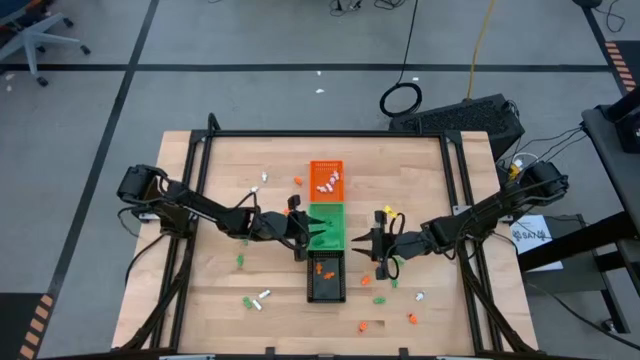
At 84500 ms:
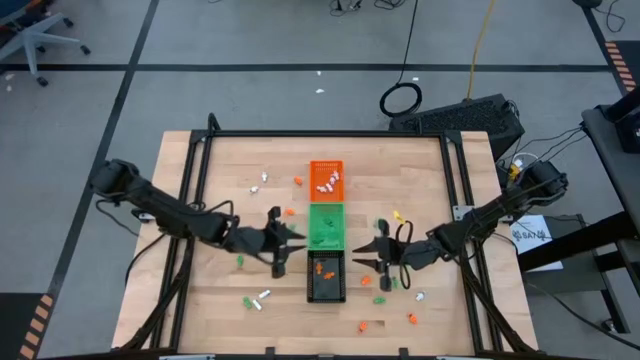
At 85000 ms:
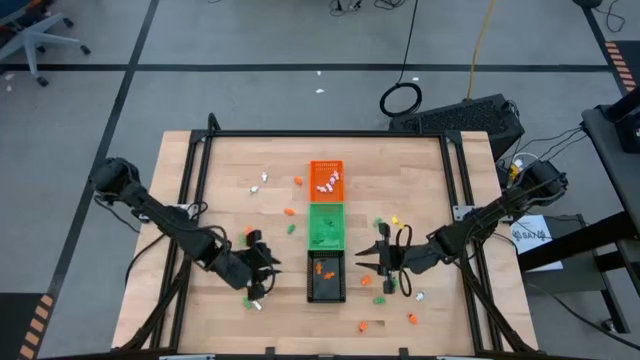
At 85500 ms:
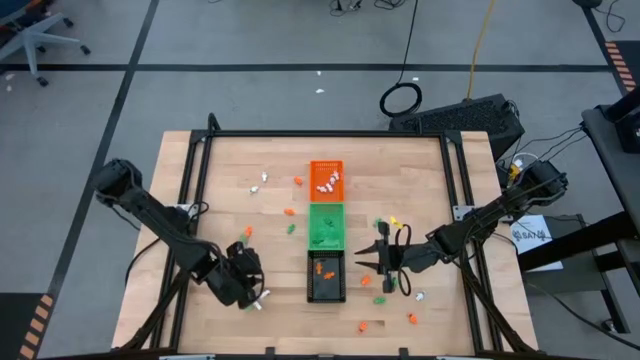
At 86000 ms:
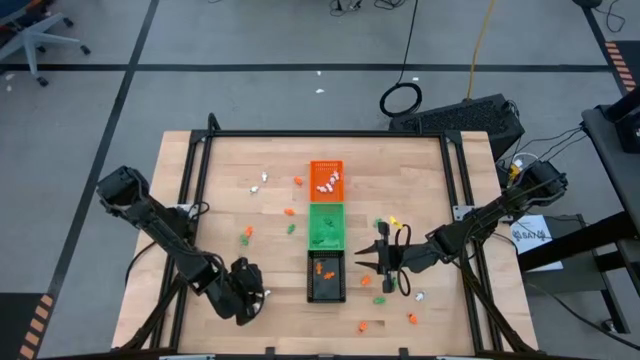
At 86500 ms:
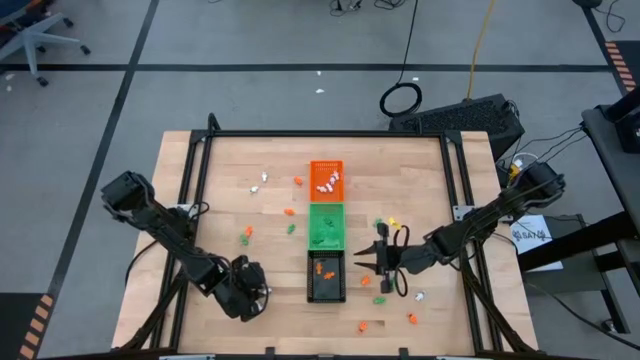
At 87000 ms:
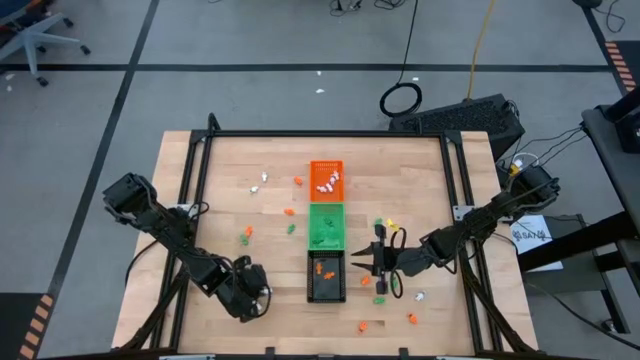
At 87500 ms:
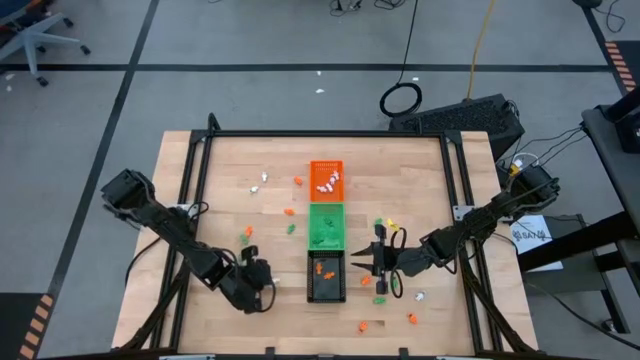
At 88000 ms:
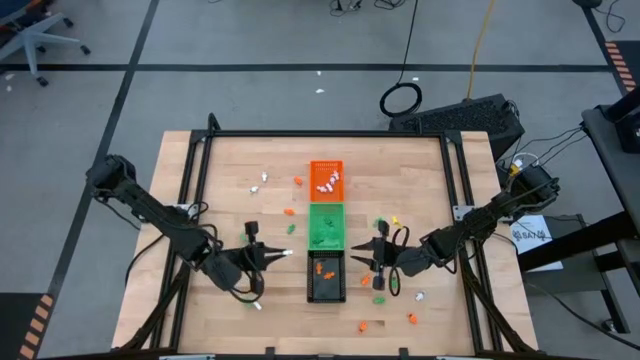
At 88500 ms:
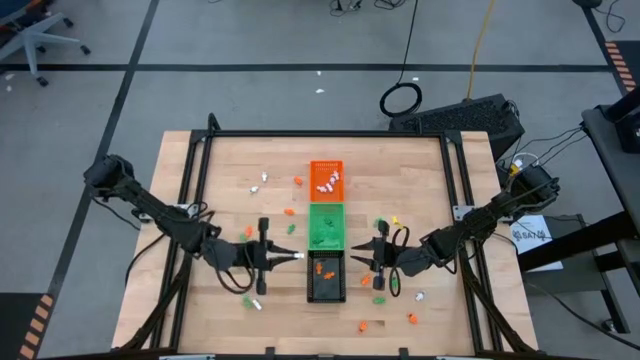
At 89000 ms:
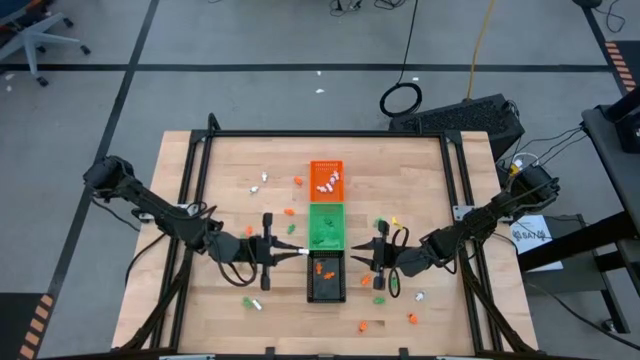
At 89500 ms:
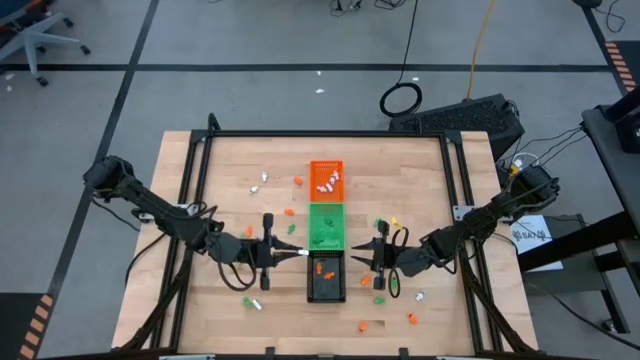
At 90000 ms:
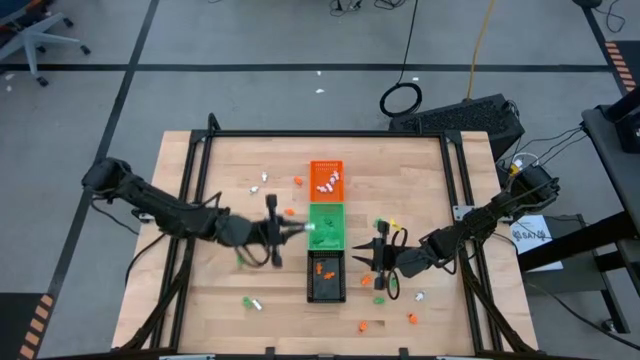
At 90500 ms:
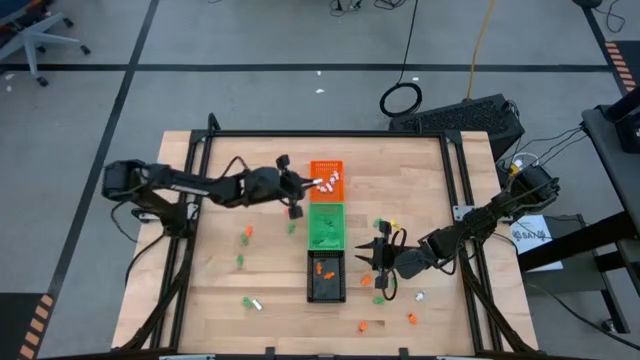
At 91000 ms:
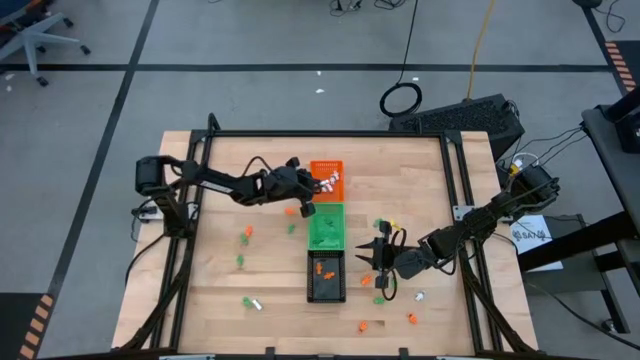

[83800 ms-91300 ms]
Task: Sort Halloween decoration
Put the white skeleton toy into the orange bin

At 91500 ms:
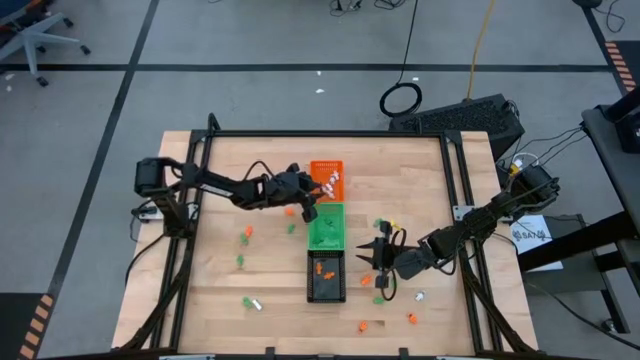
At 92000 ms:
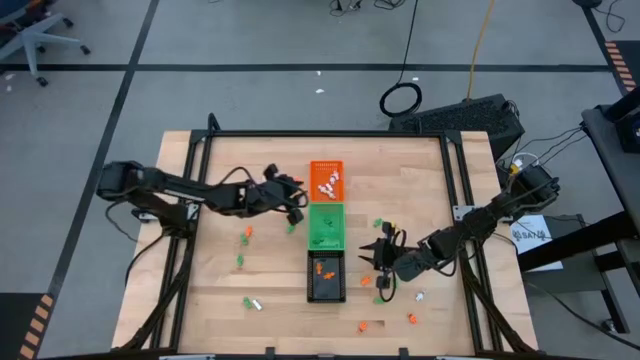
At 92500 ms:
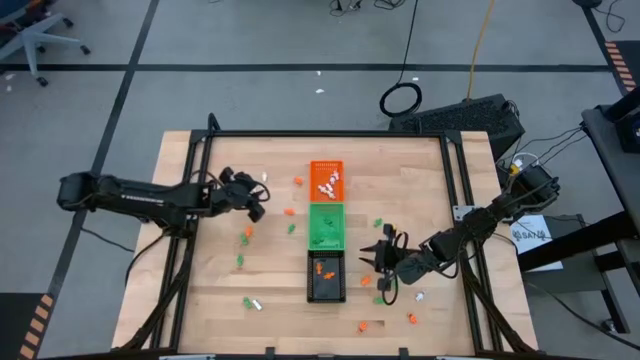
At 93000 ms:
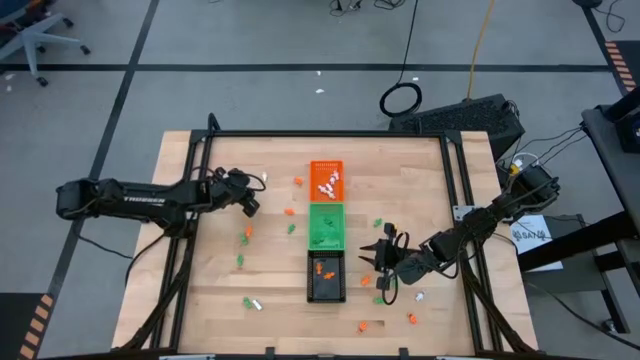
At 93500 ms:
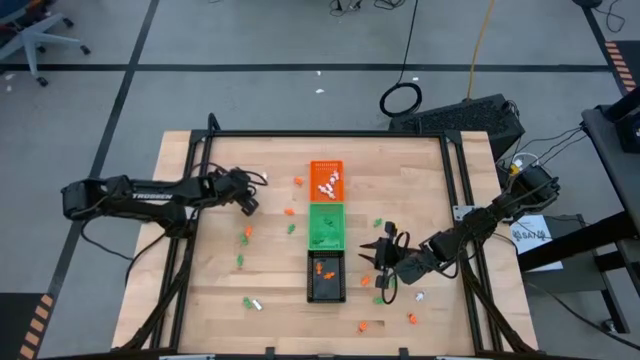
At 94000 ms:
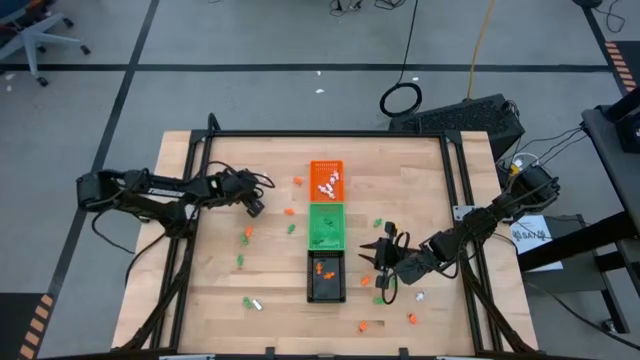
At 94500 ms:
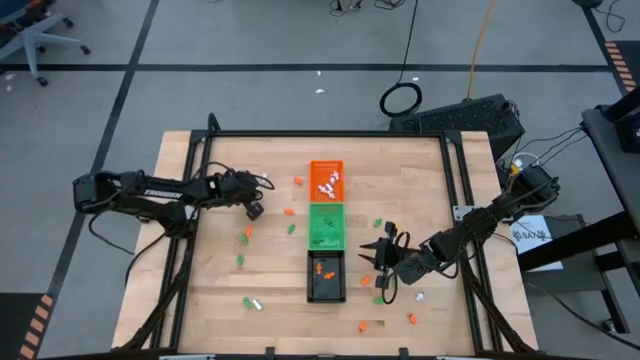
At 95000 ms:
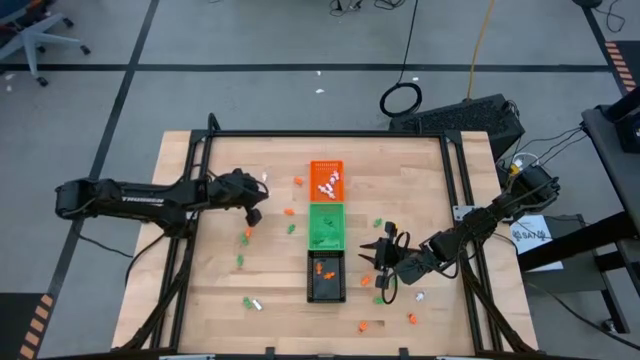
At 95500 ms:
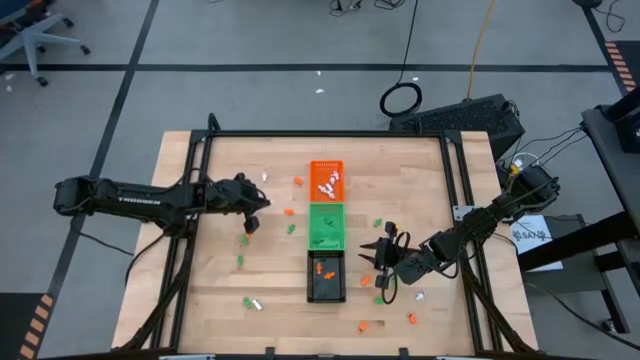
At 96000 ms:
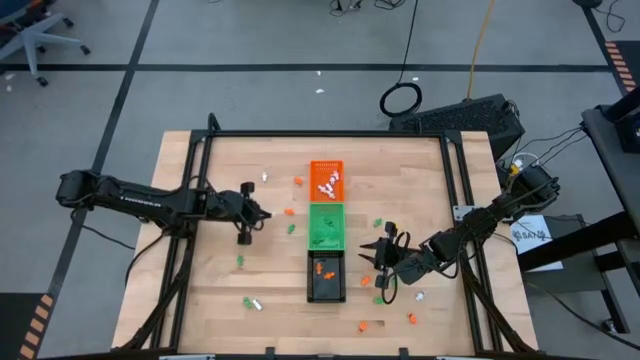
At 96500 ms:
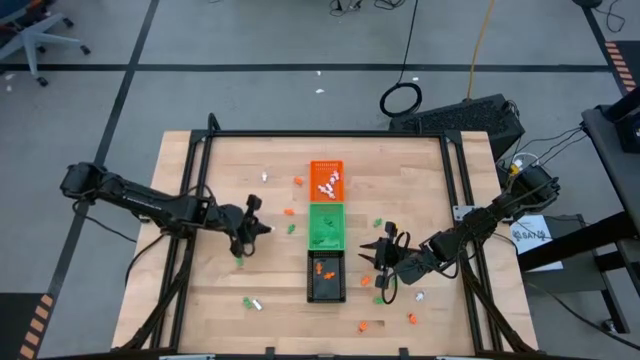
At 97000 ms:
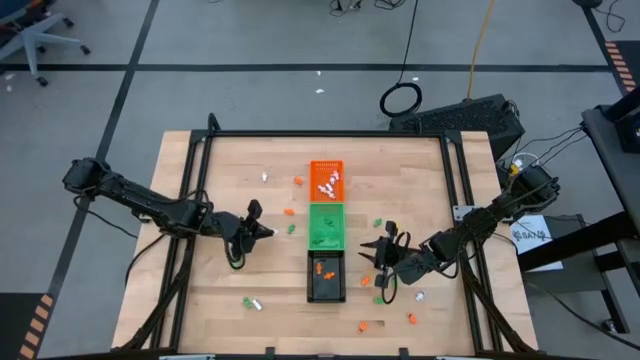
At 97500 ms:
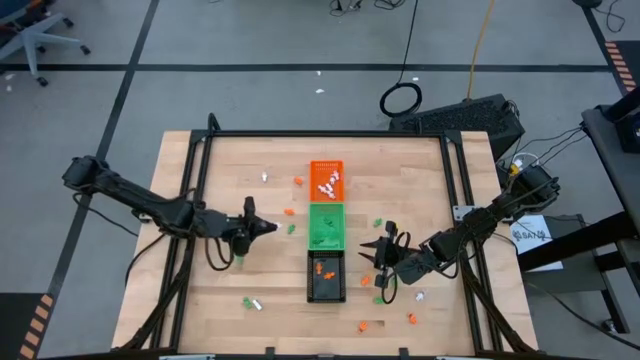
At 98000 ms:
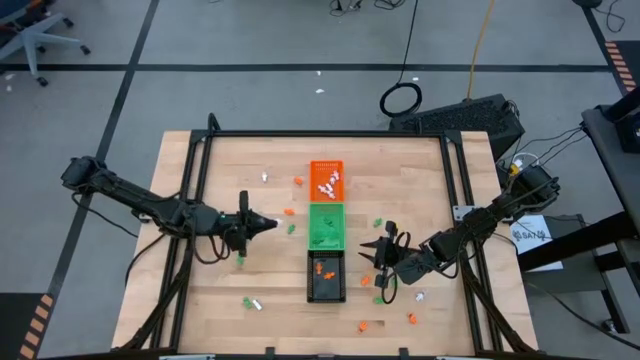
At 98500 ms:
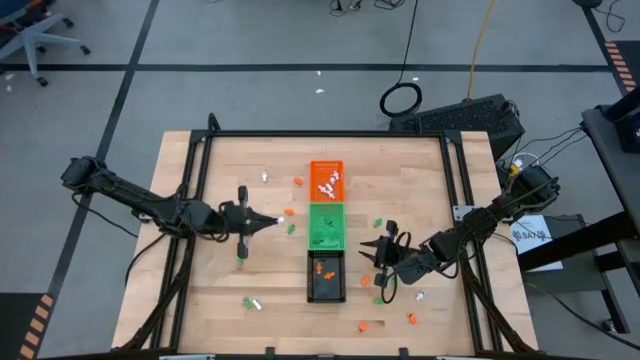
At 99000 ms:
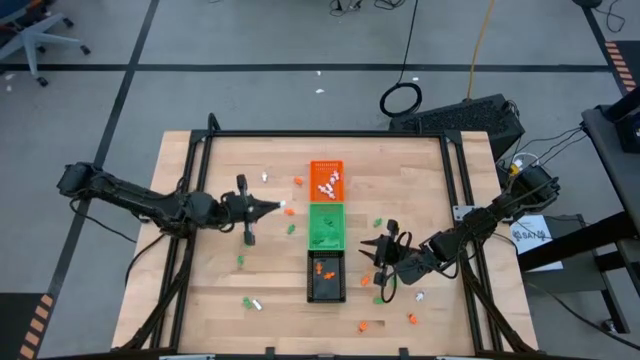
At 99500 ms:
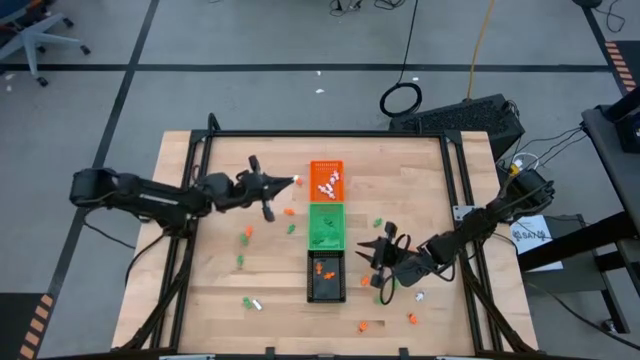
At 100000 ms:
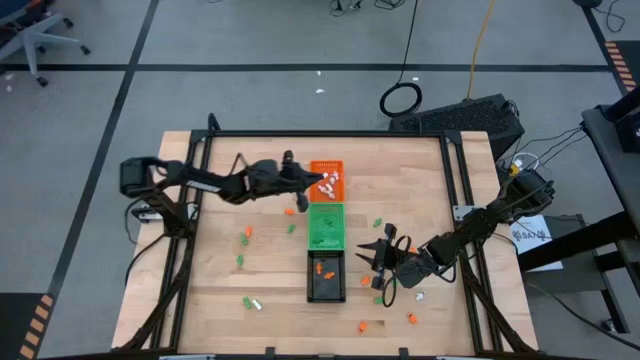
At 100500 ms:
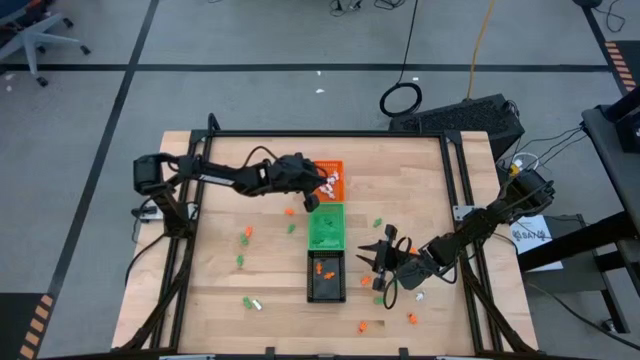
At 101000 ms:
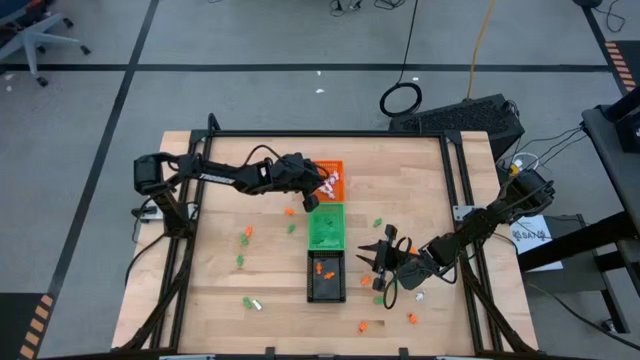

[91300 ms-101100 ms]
Put the white skeleton toy into the orange bin

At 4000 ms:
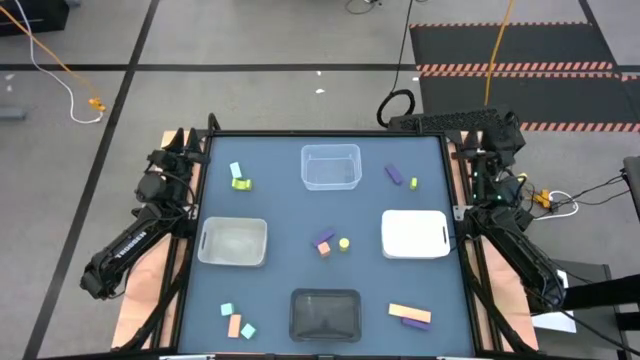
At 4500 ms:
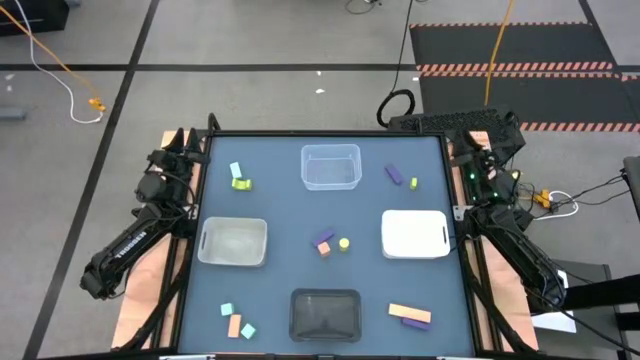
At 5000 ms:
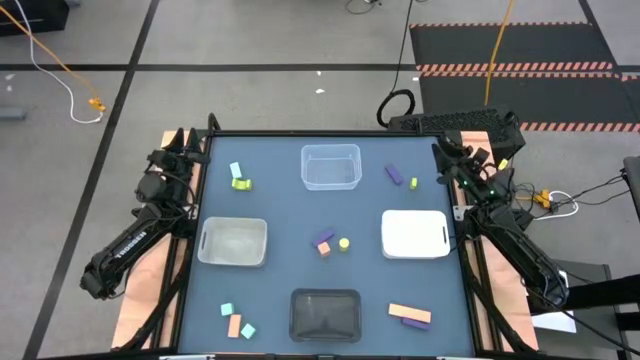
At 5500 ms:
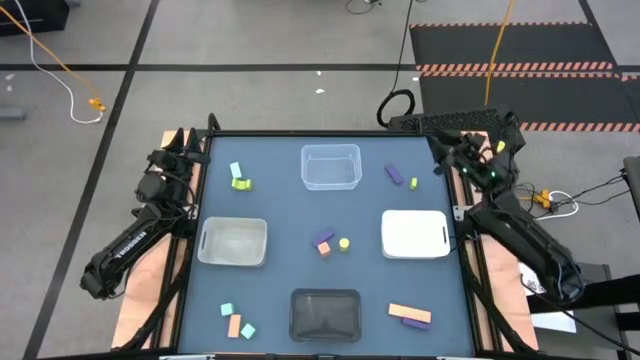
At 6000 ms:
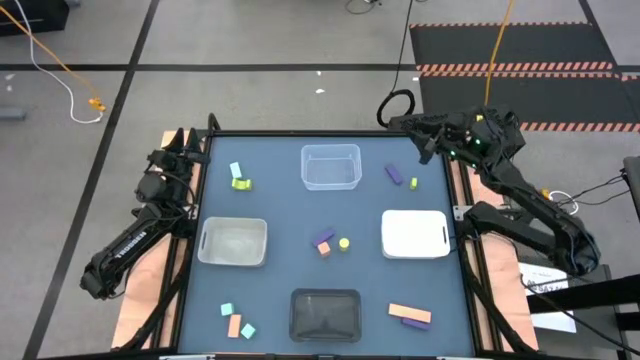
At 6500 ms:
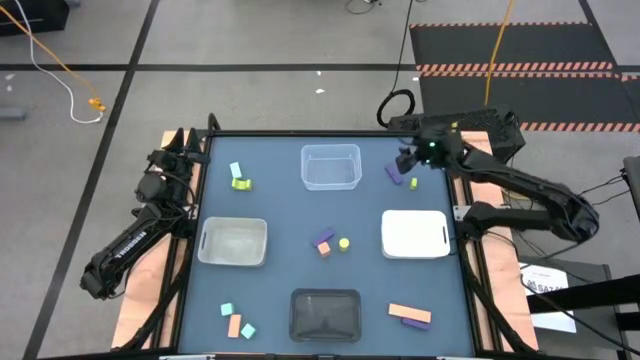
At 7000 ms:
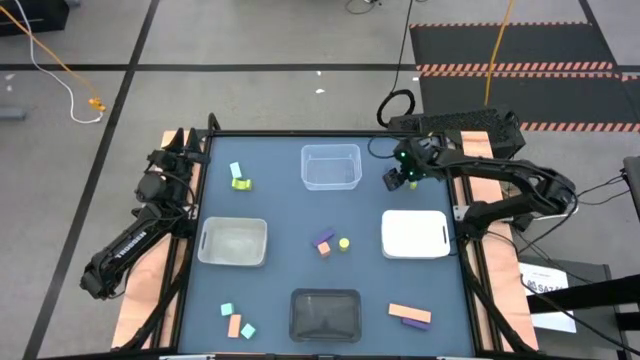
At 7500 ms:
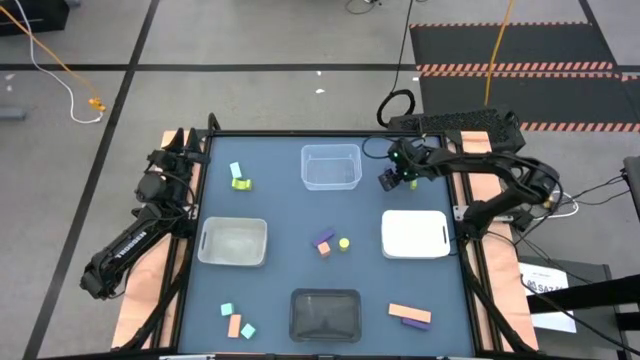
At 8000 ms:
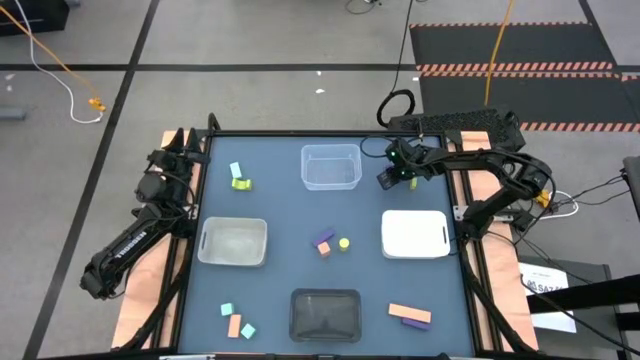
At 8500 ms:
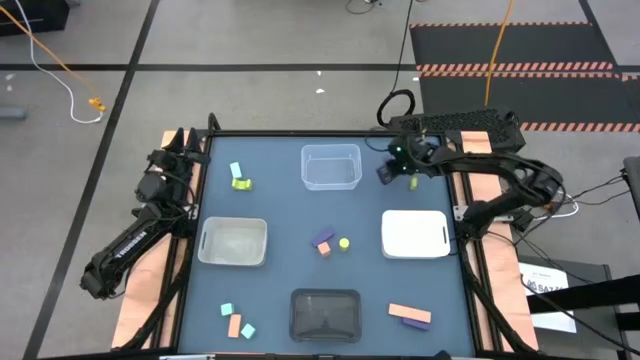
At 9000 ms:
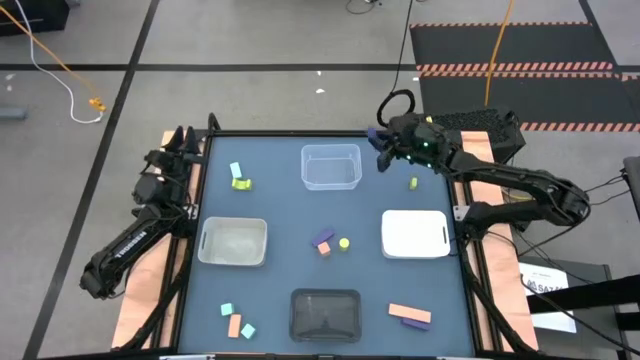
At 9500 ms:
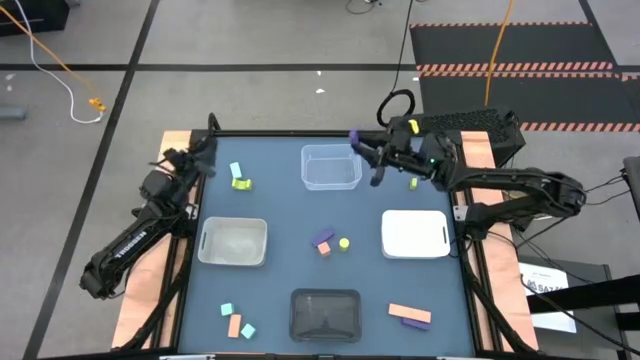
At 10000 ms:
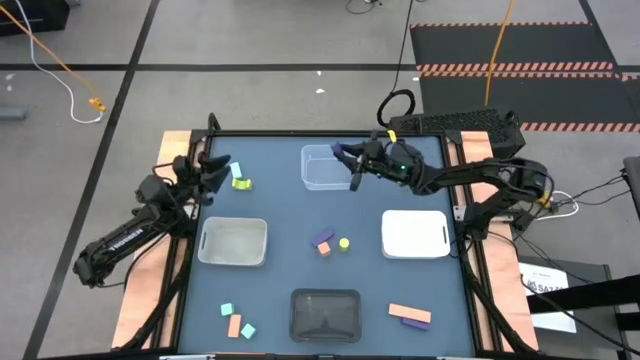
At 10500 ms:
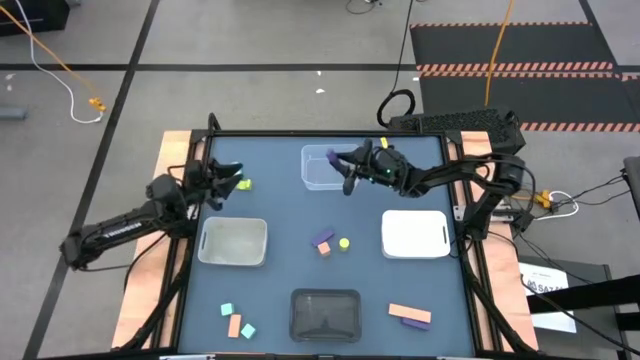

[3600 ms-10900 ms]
Task: Sort & place blocks by color
Put the top right purple block into the transparent bin
